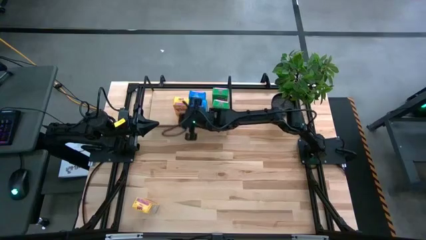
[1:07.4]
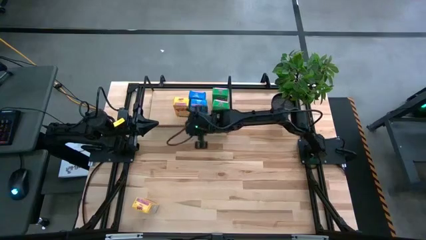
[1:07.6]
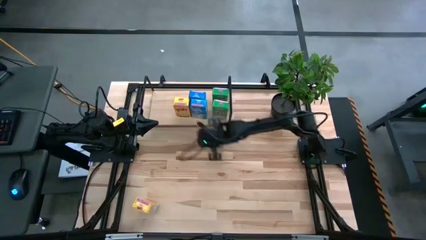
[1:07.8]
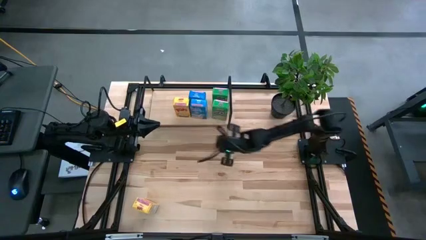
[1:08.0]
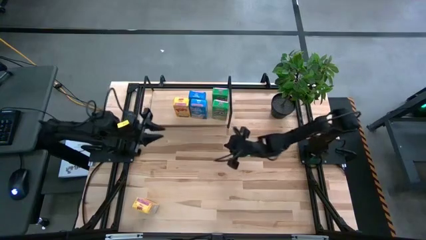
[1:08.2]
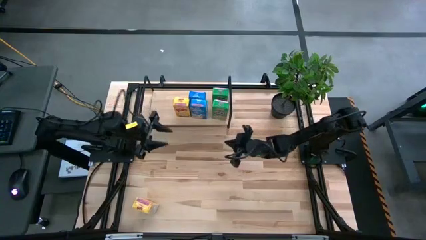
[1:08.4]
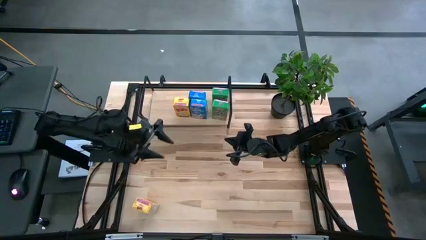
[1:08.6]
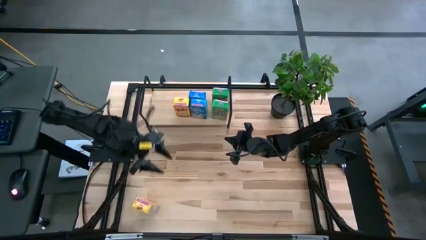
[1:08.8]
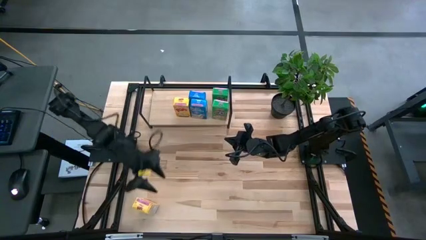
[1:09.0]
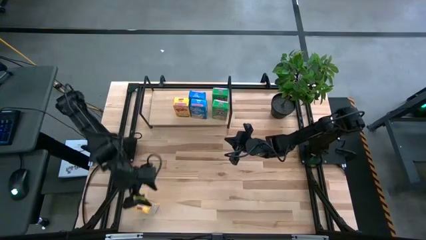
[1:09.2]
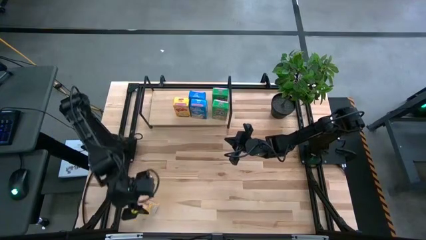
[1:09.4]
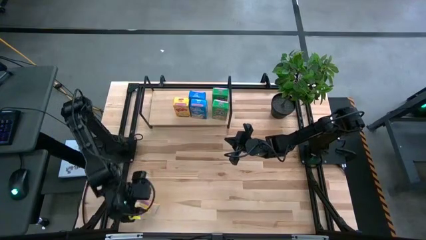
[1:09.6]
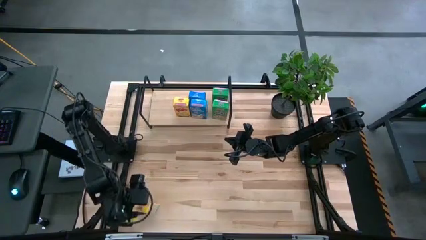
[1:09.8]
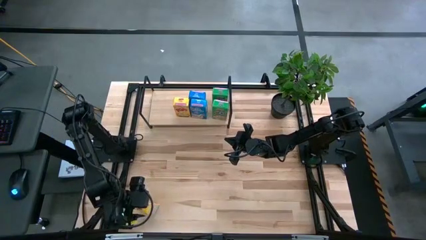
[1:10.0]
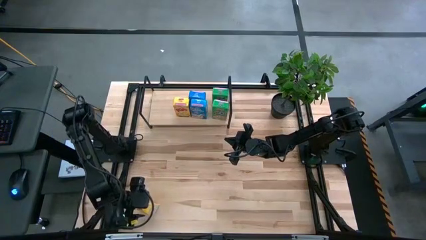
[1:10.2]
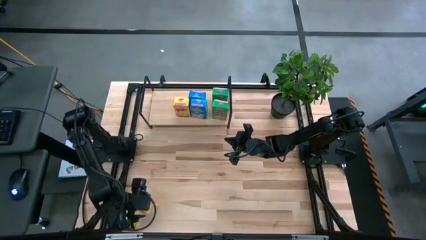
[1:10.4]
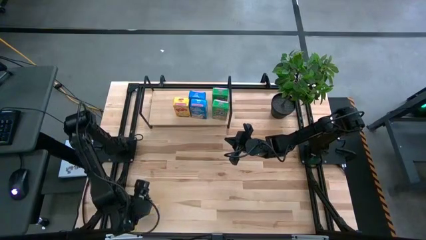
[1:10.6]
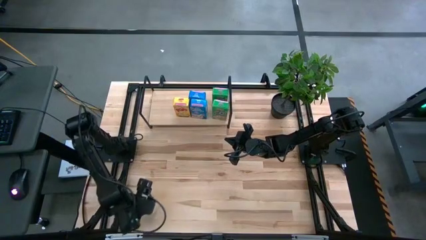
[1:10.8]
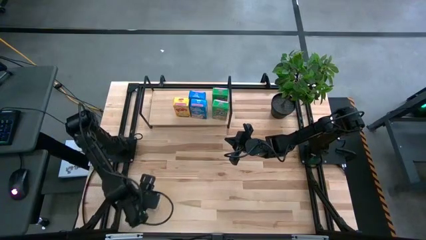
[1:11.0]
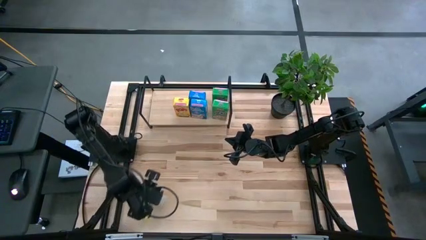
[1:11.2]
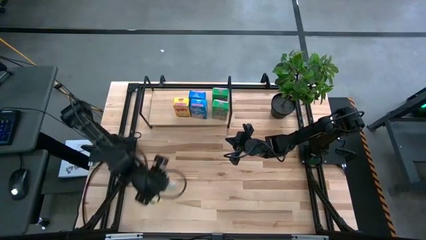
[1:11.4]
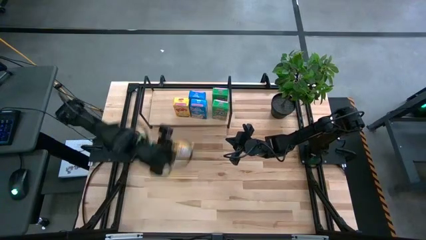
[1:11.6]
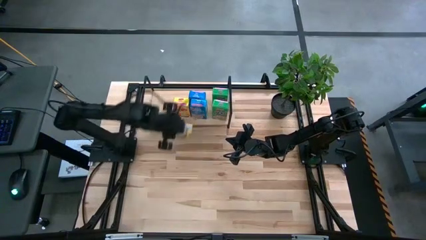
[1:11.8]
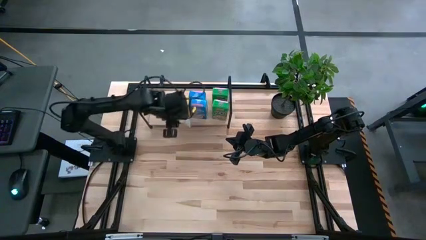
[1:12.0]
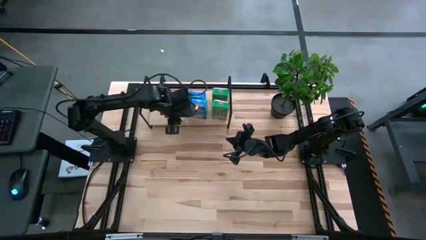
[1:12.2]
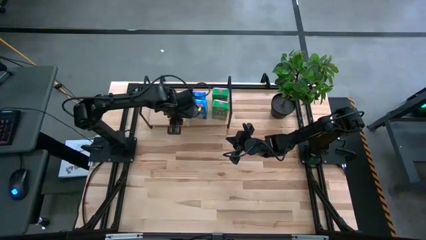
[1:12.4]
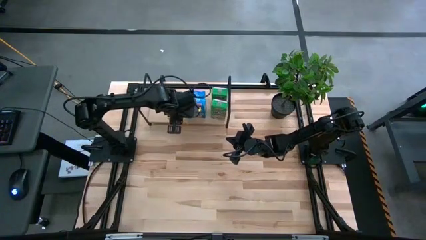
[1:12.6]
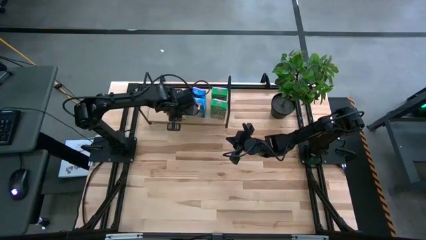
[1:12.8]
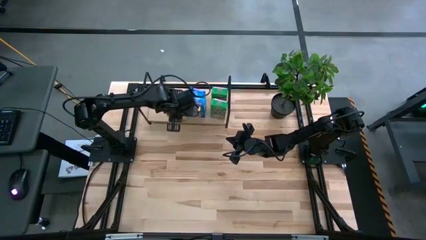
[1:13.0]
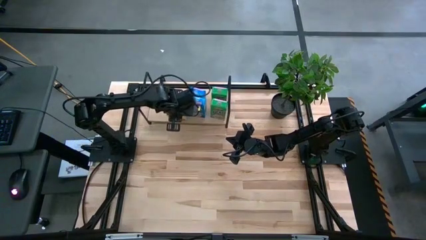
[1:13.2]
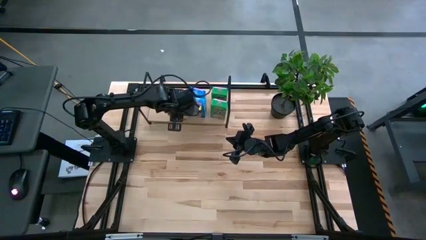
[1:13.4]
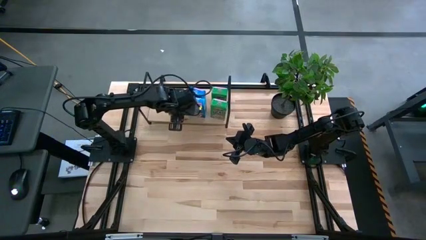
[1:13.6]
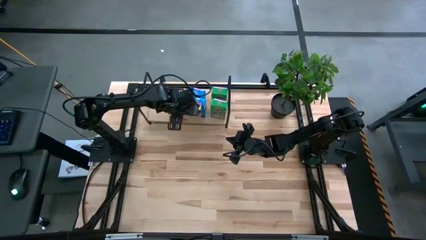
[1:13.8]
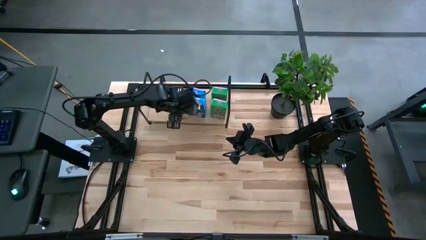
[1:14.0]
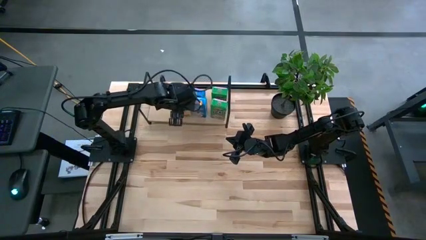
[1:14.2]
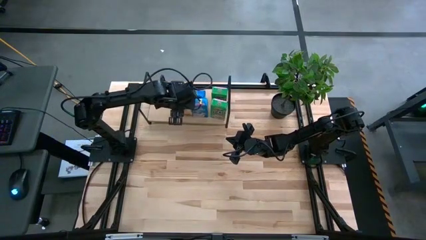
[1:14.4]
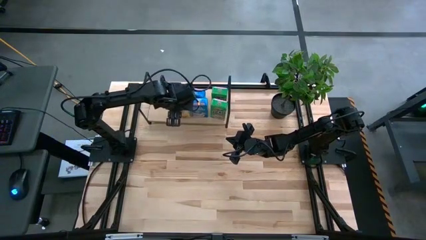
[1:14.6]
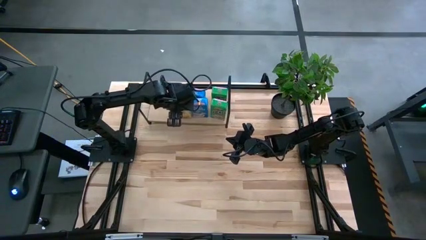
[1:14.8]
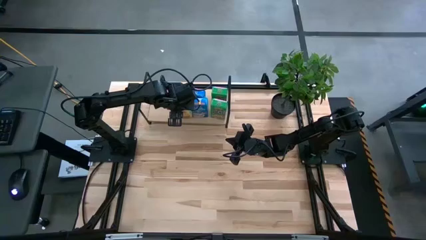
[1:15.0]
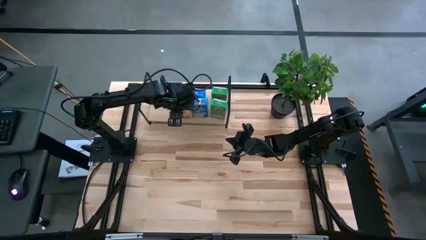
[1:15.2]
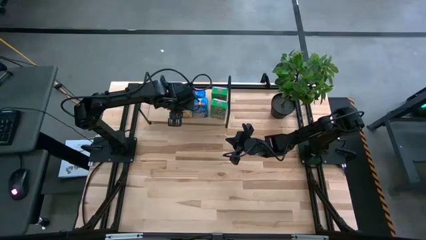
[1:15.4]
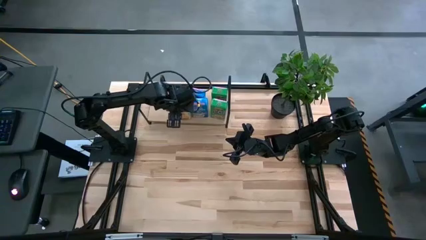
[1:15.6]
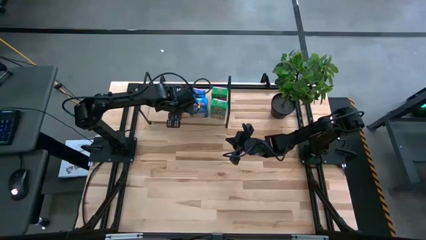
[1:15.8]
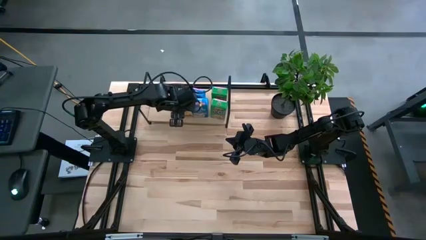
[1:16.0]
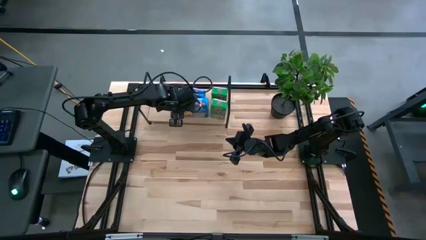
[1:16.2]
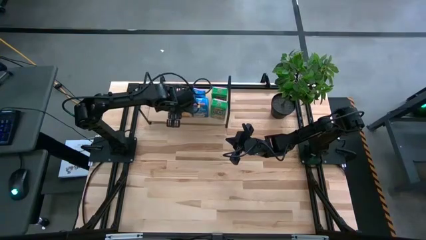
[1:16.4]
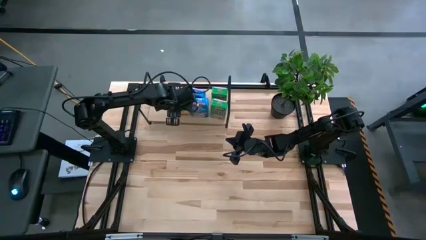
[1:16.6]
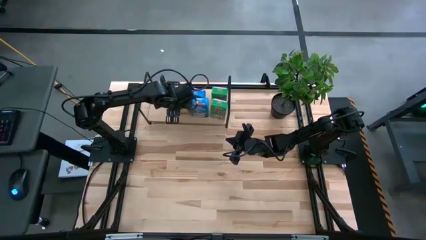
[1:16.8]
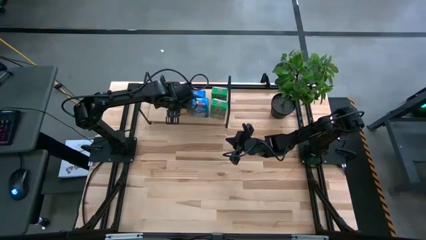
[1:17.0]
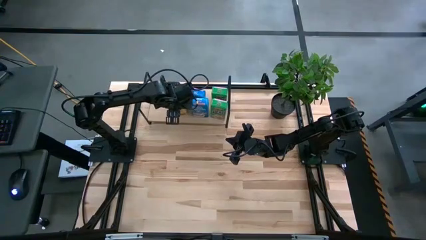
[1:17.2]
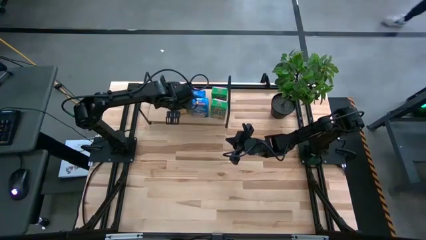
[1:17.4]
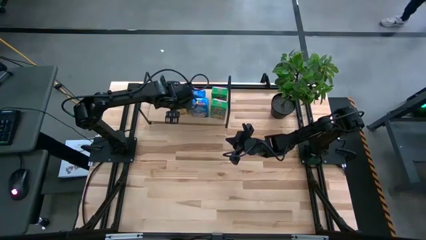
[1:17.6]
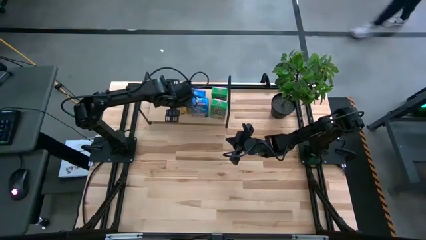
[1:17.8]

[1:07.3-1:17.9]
Task: Stack cereal on shelf
Put the yellow cereal box aligned with the other yellow cereal box on the shelf

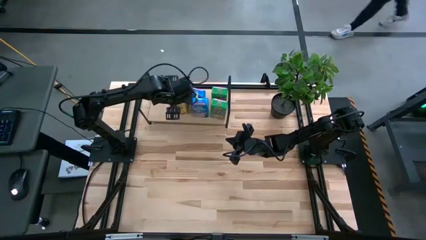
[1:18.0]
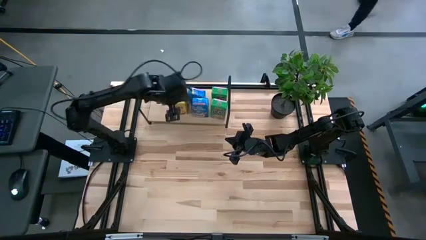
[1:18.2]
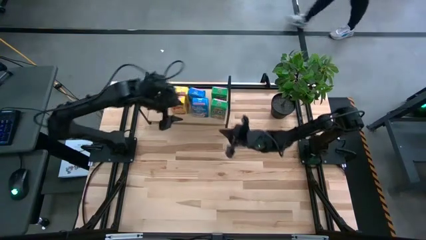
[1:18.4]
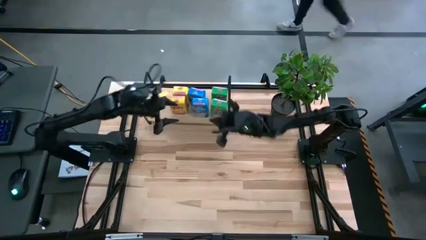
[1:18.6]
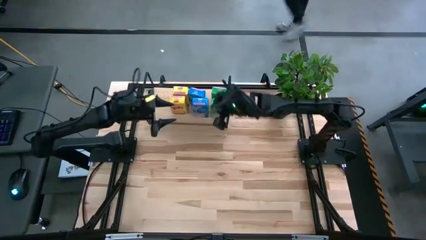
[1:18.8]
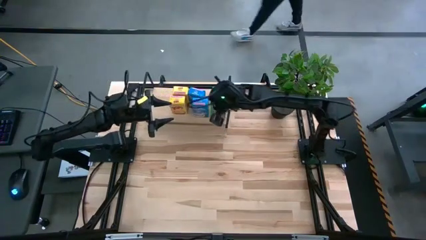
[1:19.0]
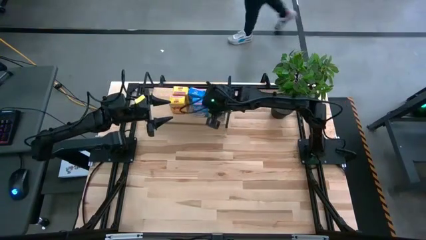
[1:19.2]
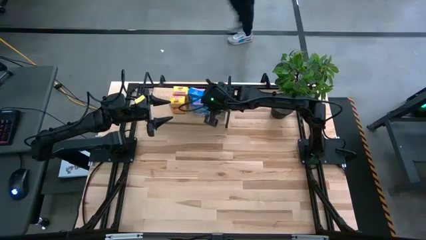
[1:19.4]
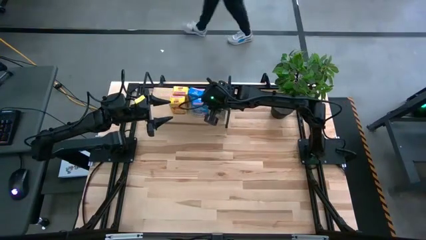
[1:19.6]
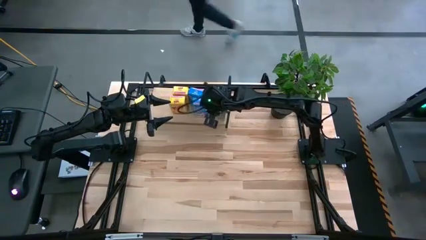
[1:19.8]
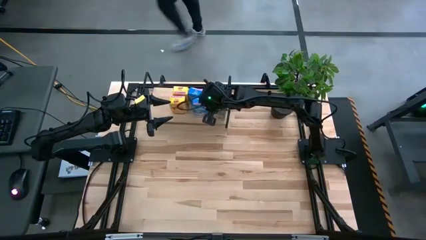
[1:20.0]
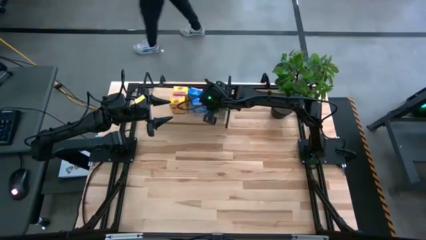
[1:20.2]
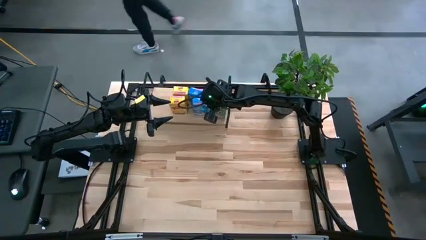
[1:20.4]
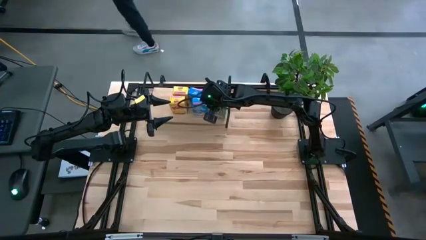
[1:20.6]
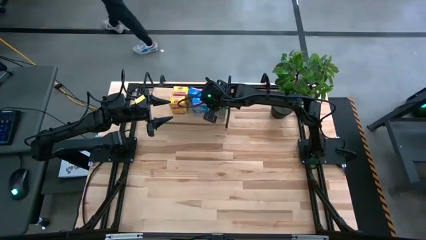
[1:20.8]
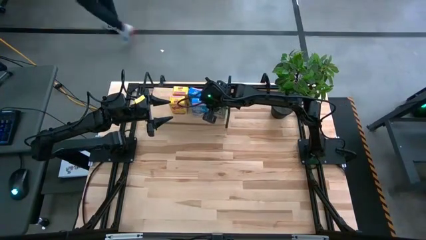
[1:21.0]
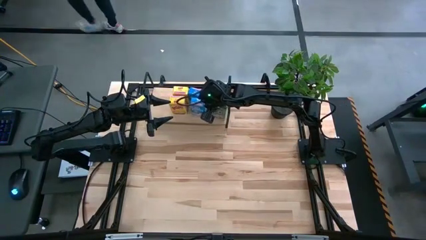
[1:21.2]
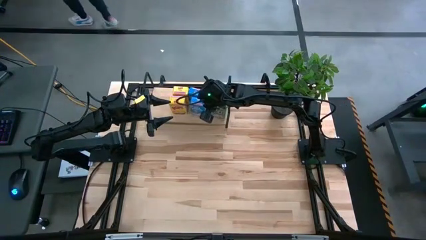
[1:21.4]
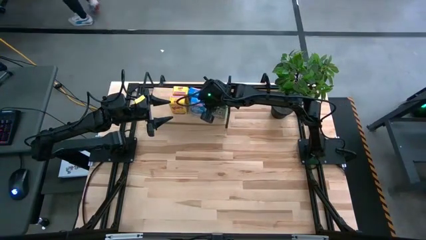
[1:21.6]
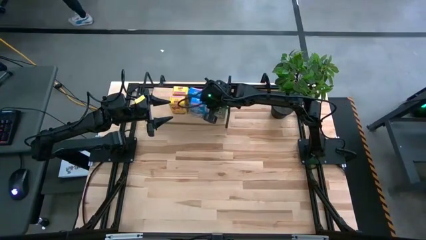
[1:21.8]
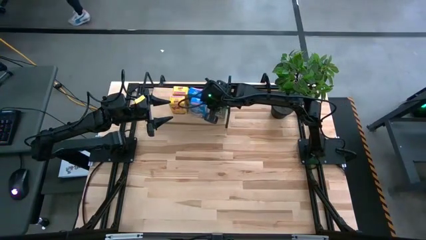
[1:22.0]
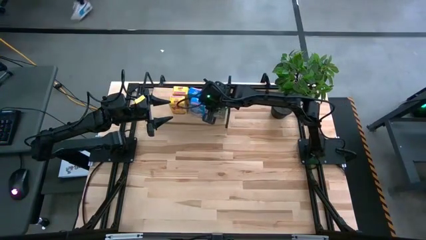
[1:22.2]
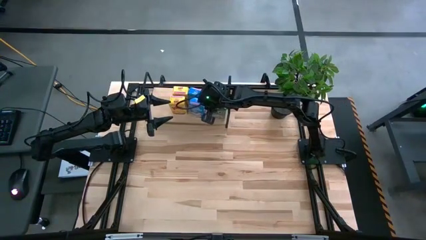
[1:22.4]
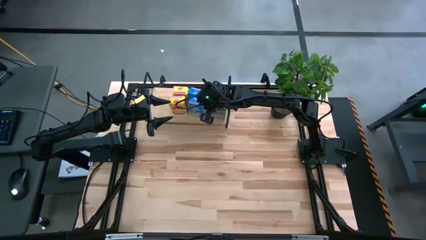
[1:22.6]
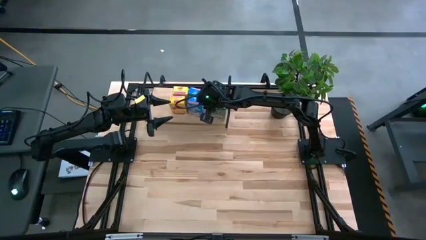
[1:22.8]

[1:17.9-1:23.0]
Adjust the blue cereal box on the shelf

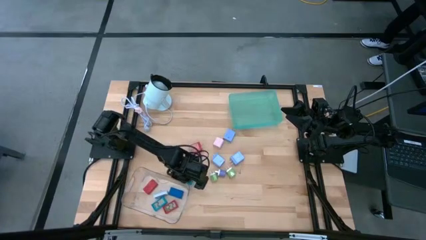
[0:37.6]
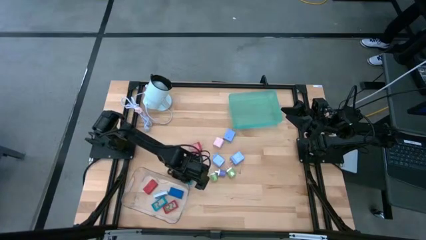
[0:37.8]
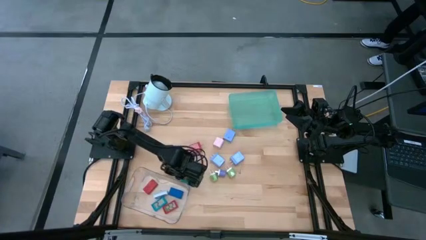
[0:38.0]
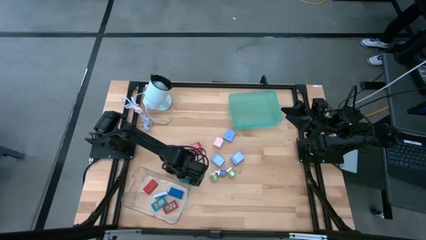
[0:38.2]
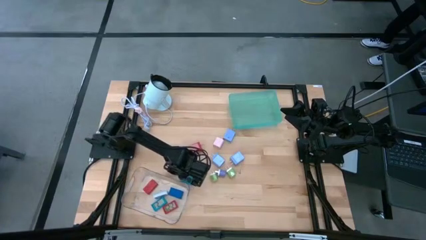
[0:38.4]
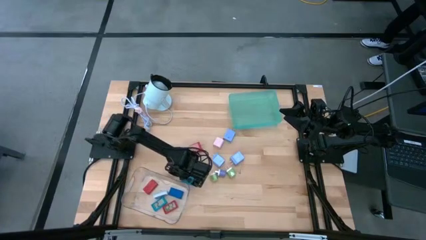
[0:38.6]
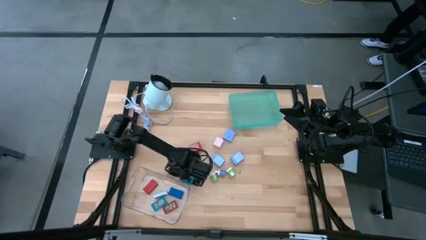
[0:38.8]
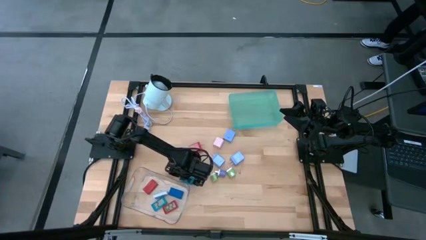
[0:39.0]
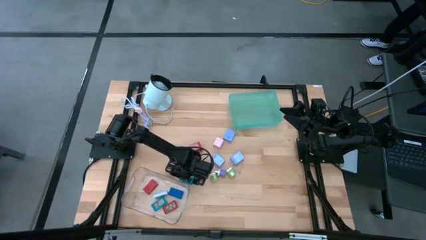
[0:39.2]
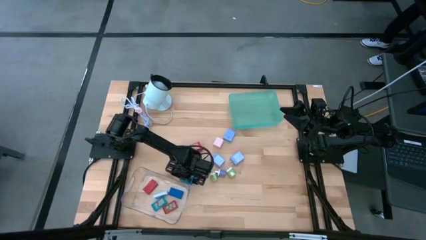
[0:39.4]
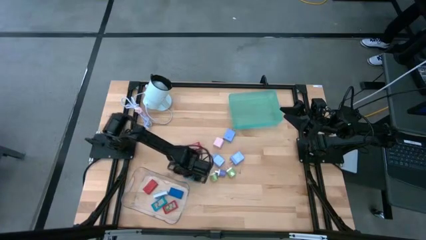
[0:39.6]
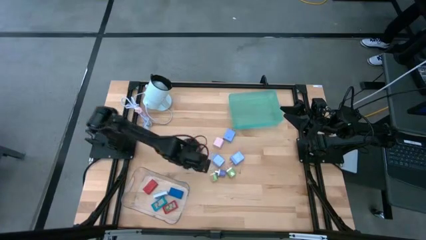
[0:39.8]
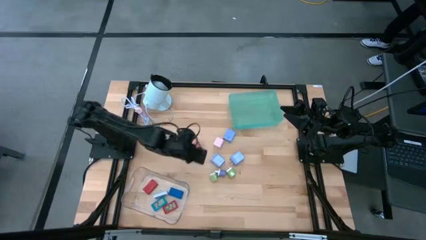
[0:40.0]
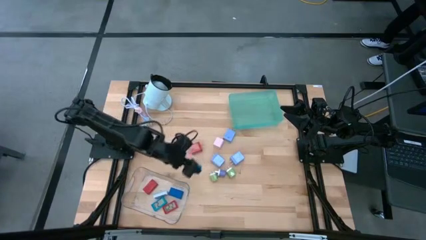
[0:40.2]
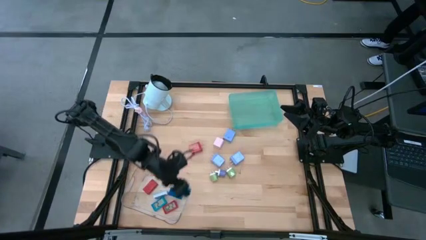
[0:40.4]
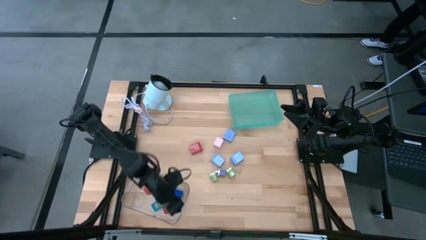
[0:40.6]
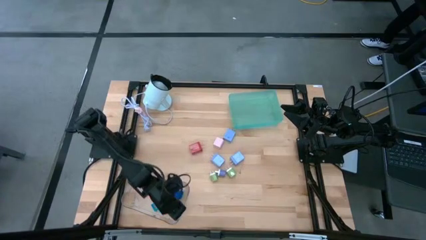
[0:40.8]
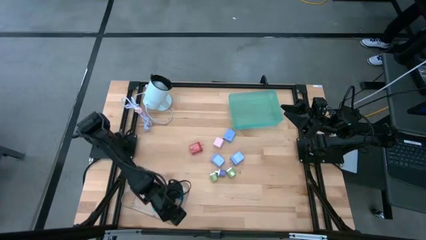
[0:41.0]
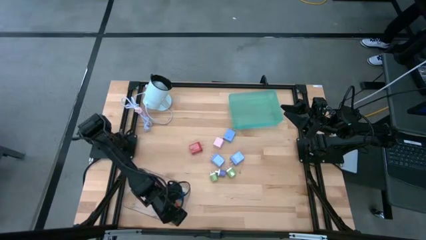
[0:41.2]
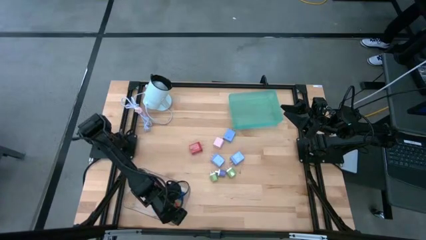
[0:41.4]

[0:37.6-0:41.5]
Task: Pick & Place Office items
Put the light blue digital clock into the transparent bin
